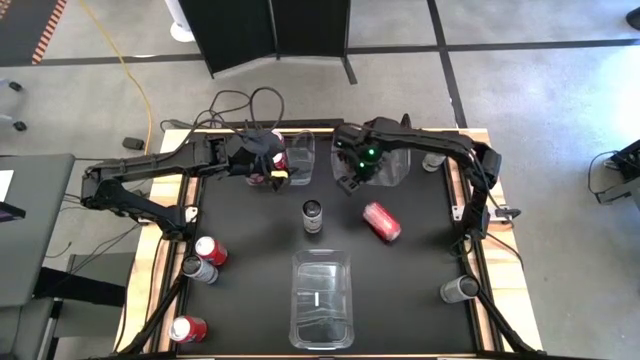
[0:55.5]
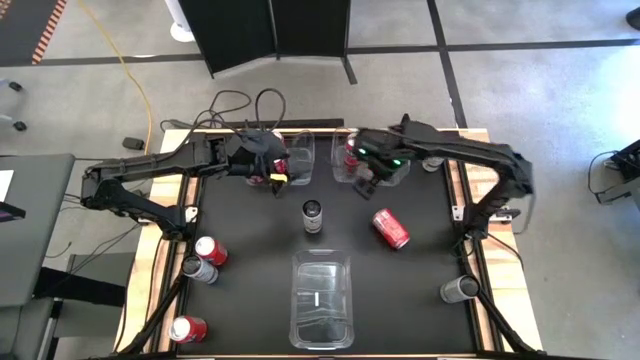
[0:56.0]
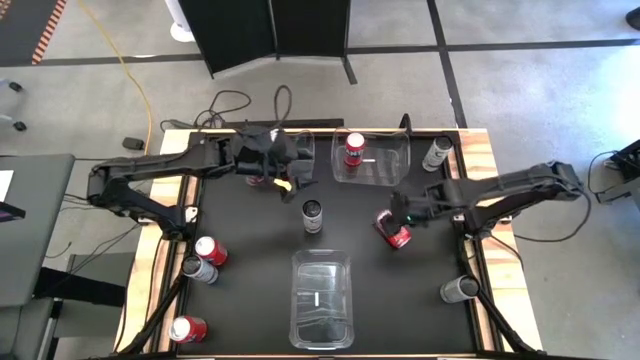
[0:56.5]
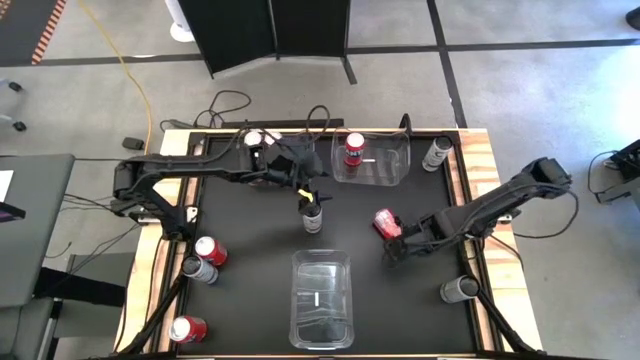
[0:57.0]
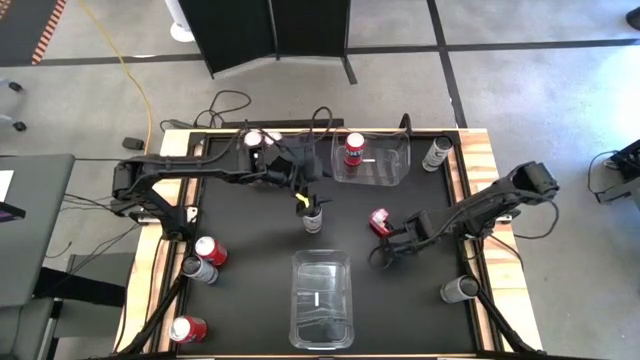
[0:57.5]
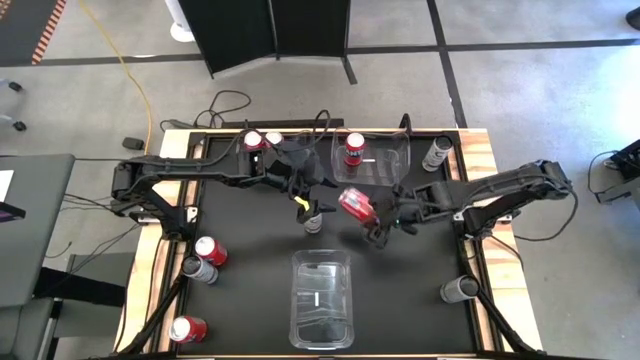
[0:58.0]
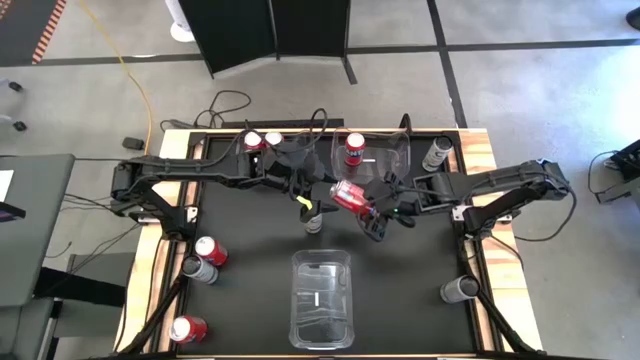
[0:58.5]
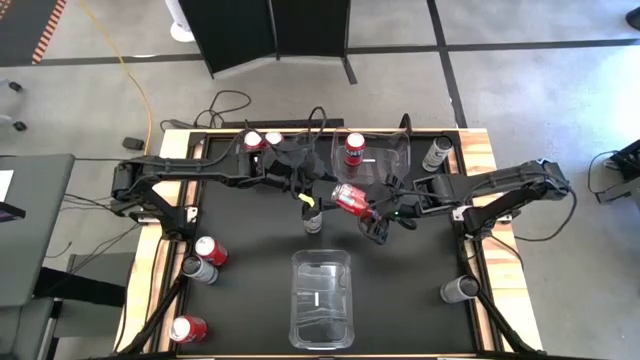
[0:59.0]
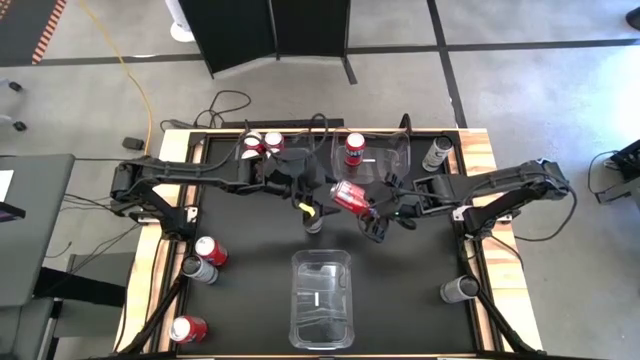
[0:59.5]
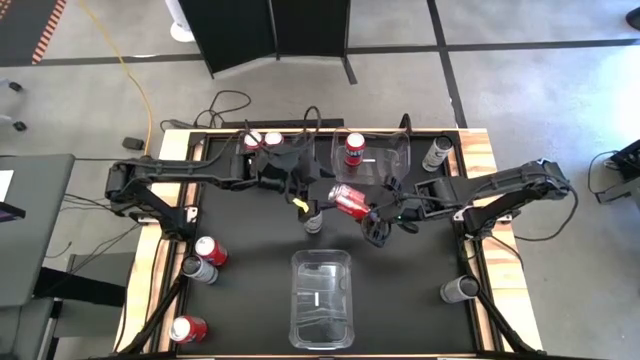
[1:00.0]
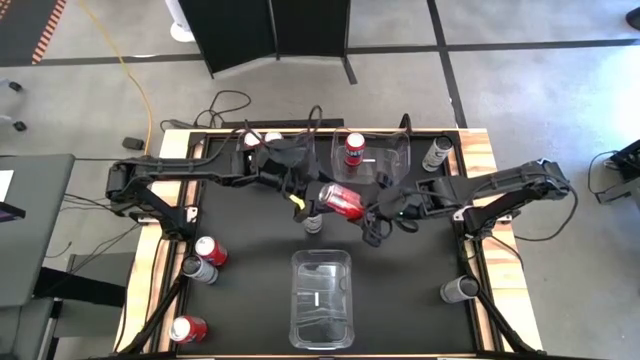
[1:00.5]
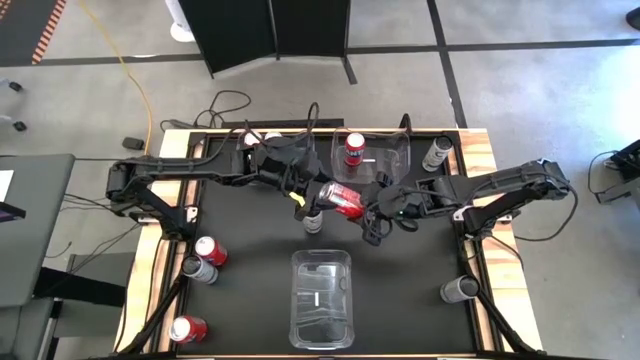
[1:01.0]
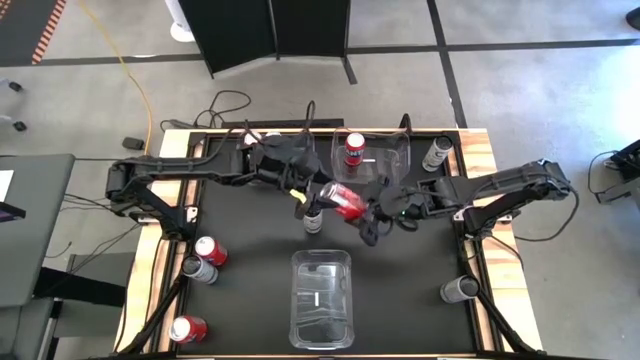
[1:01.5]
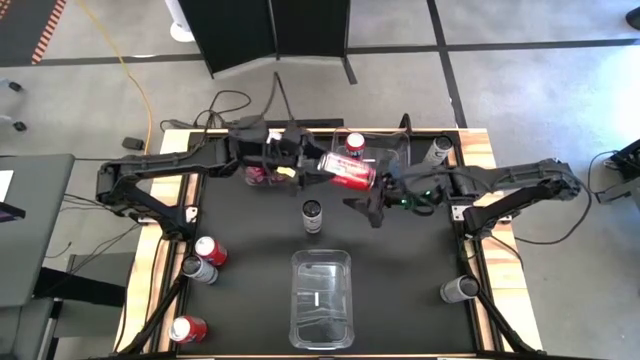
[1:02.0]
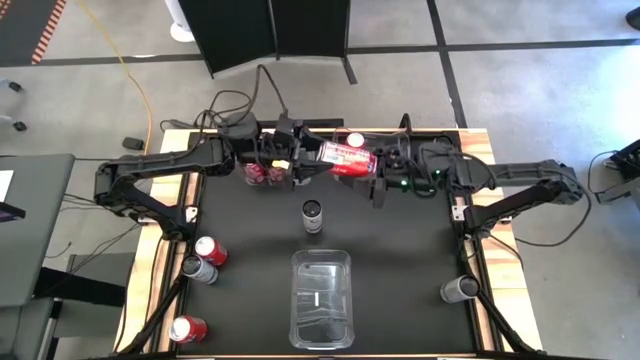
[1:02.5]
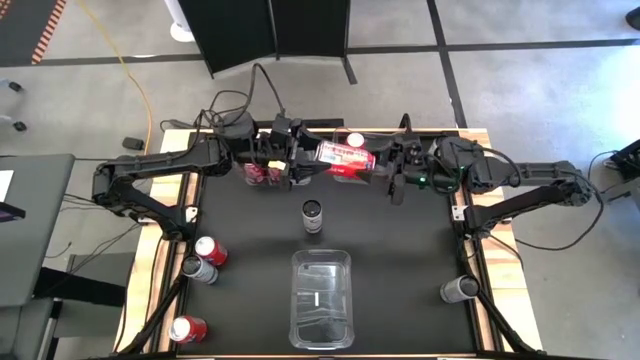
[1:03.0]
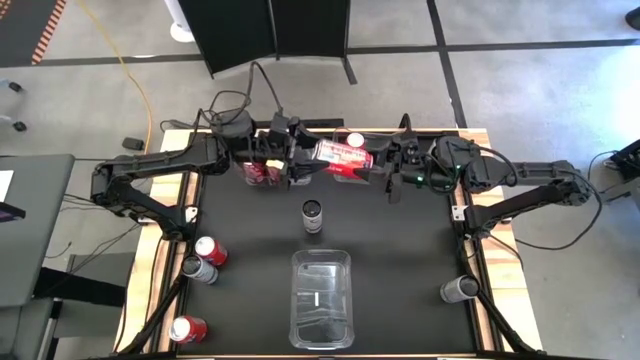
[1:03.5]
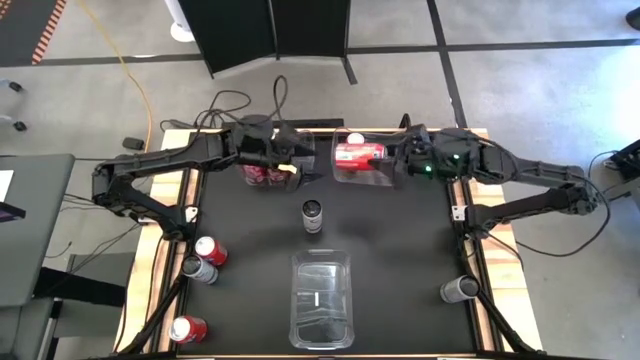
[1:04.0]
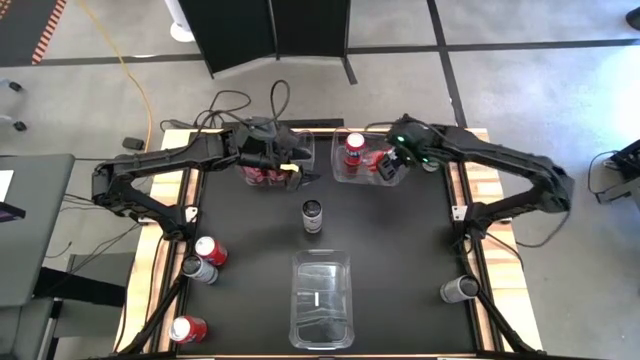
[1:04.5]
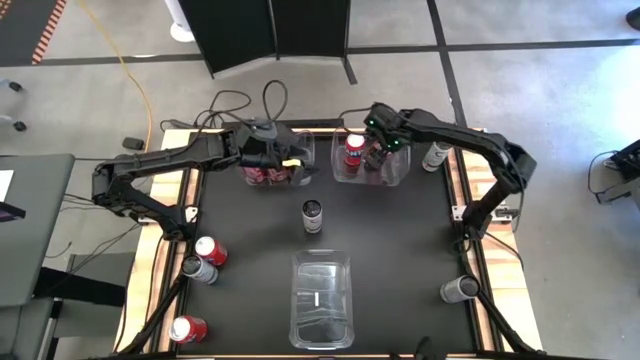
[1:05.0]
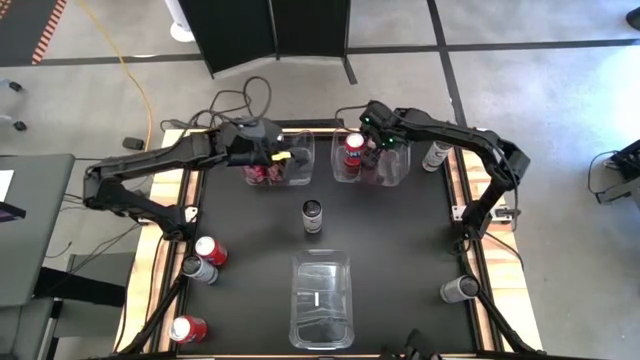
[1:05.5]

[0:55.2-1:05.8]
Task: Sort soda cans
Put the orange soda can into the right transparent bin

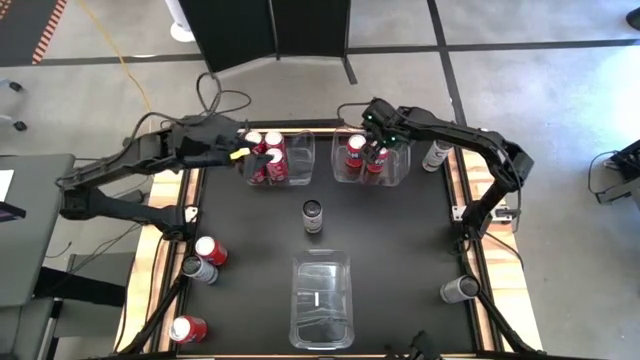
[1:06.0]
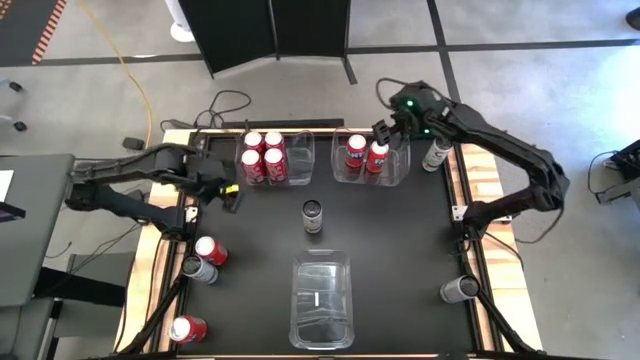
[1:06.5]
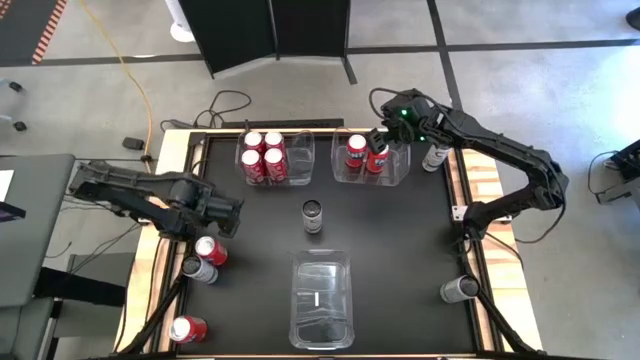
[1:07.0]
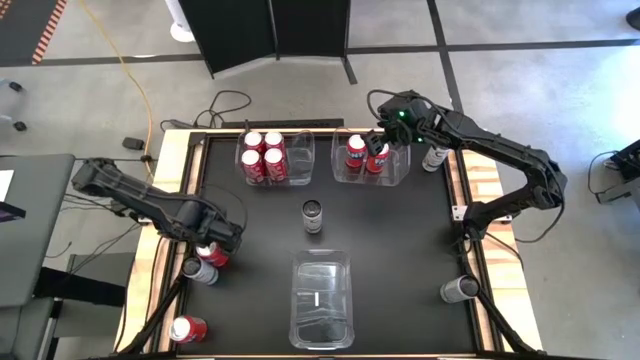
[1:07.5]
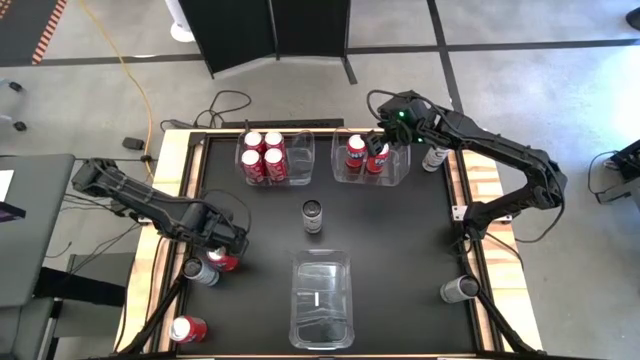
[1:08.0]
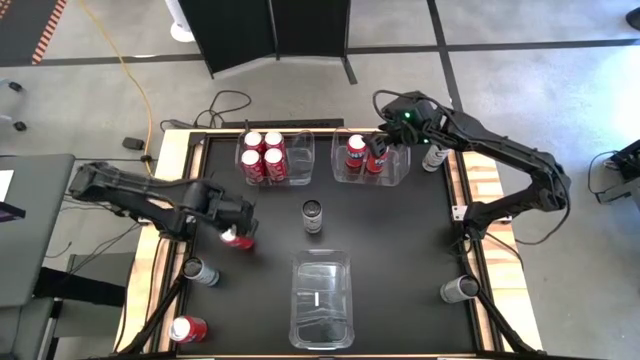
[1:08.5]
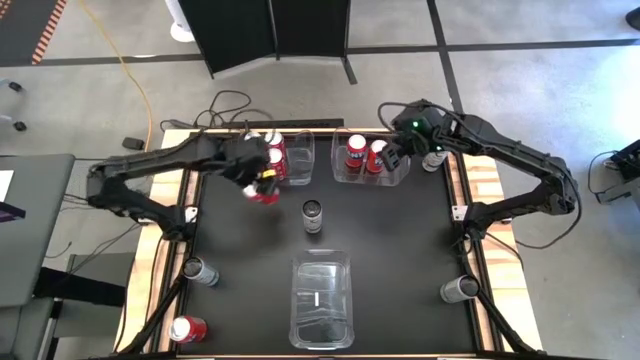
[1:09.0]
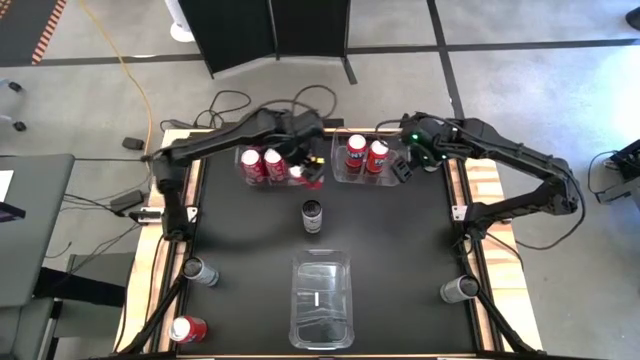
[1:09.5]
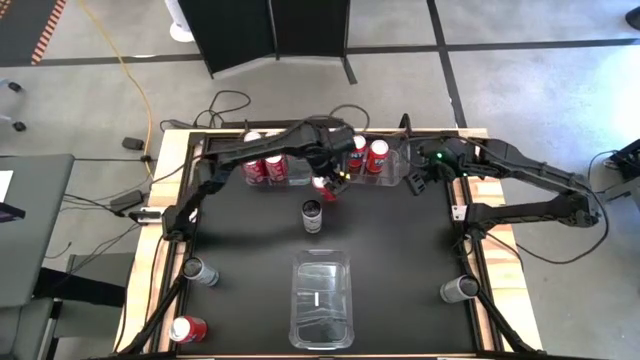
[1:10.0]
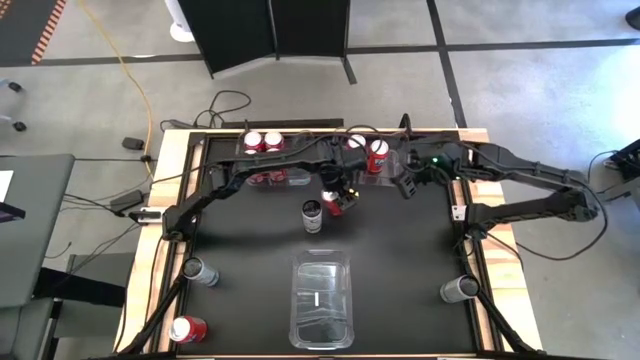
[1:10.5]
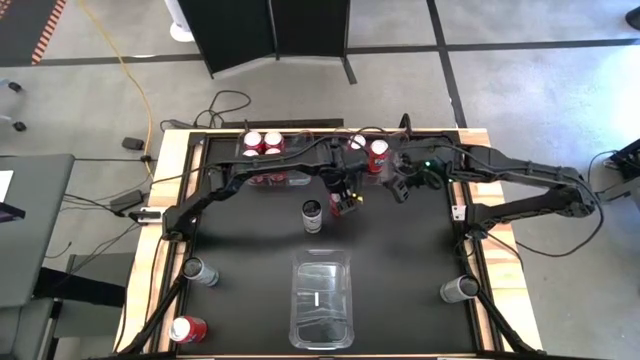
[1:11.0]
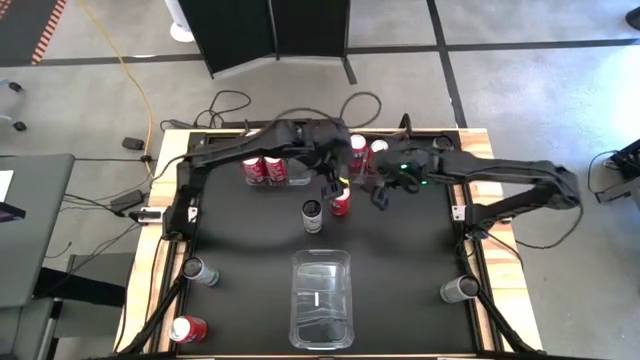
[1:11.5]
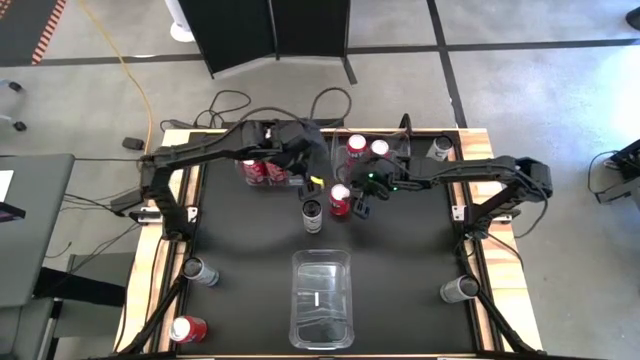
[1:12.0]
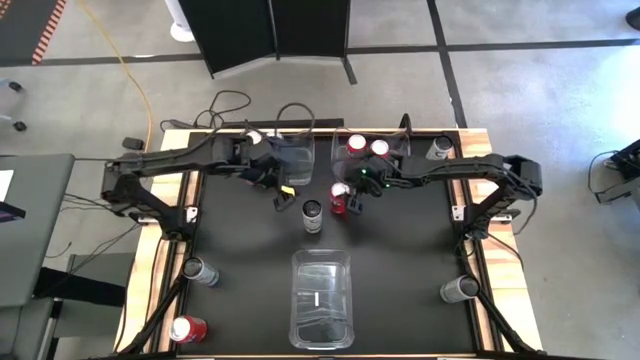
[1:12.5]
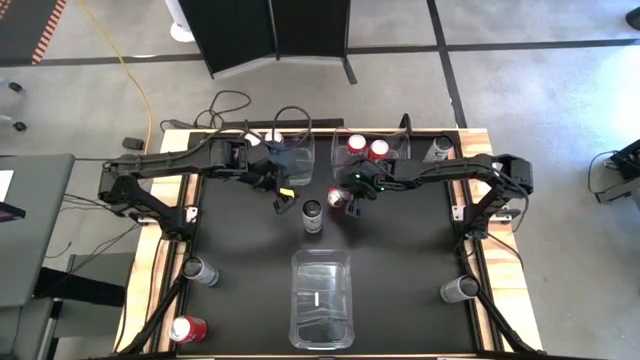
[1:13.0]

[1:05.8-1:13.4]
Put the orange soda can into the right transparent bin

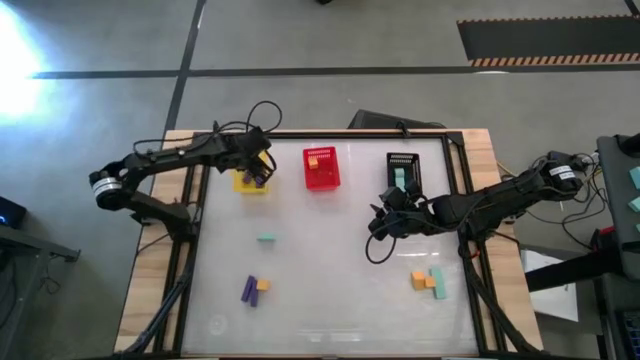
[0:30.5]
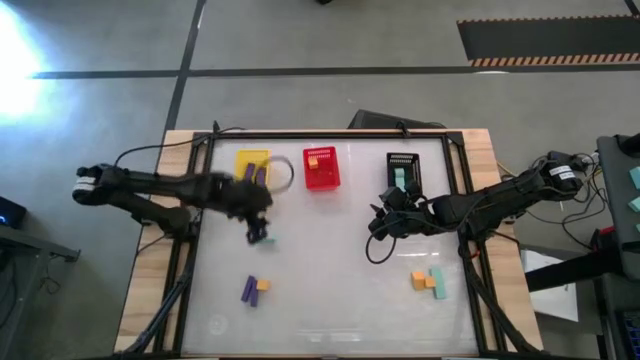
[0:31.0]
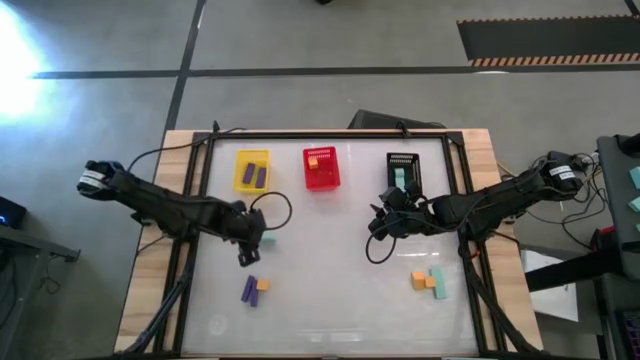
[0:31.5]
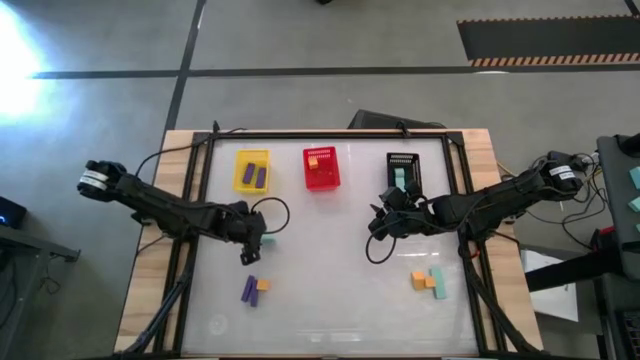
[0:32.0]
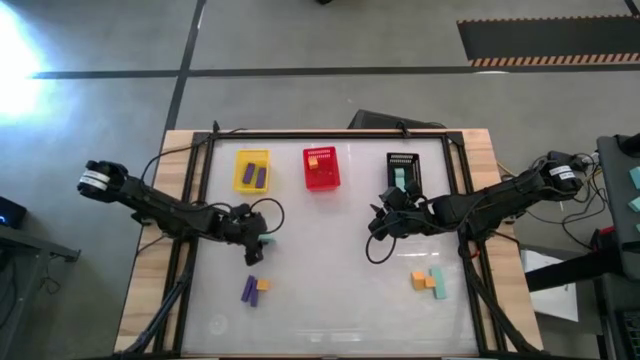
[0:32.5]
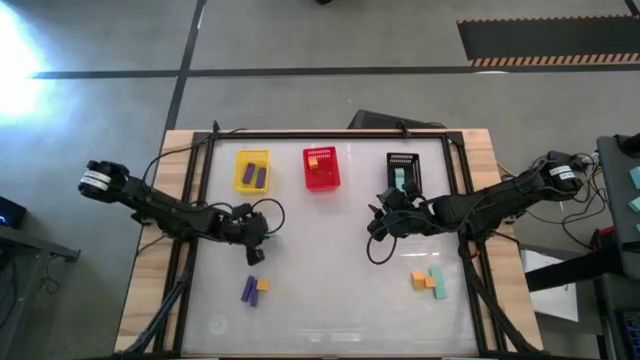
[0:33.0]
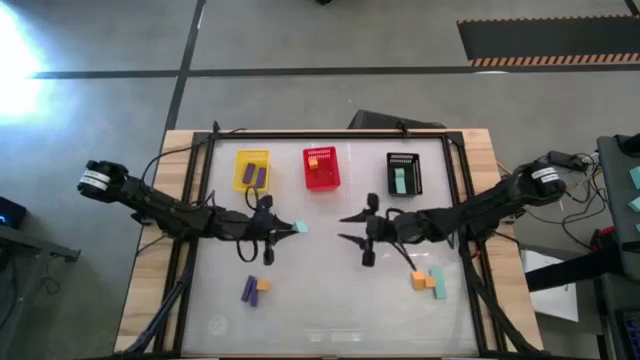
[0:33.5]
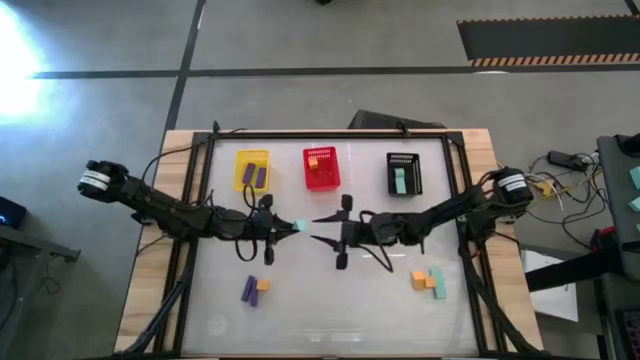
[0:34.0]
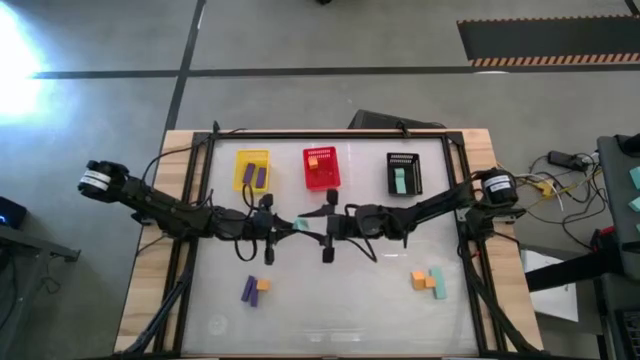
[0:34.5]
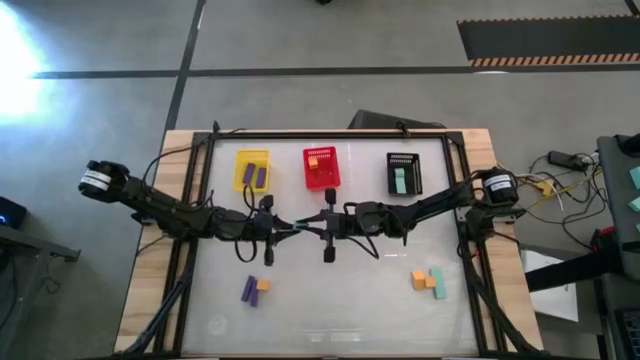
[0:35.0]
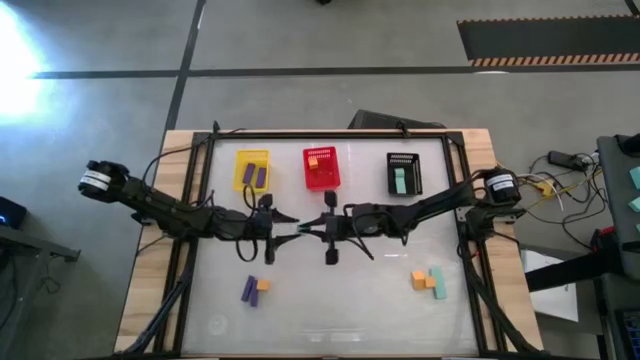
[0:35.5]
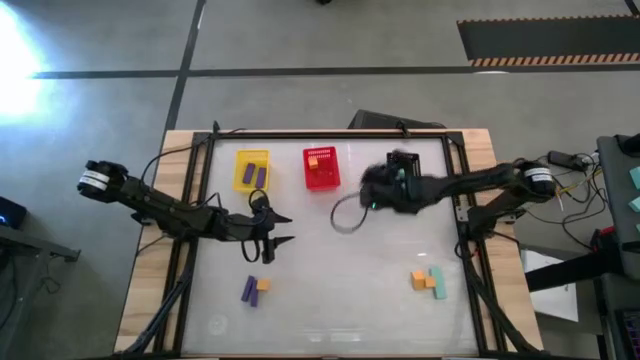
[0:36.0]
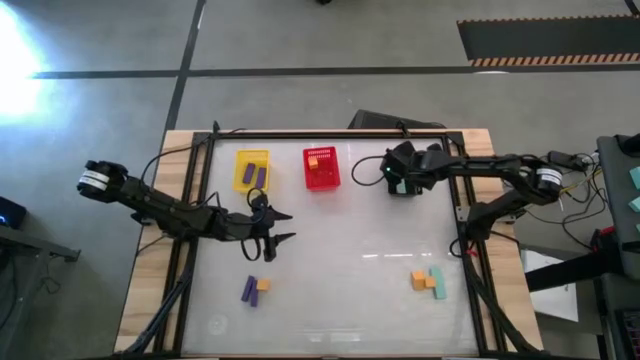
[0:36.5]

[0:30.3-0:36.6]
Task: Sort & place blocks by color
Put the blue block into the black bin
